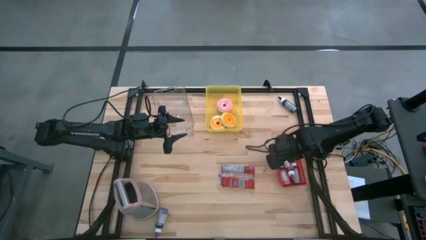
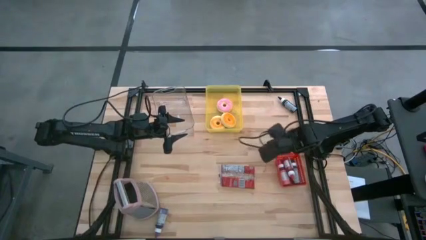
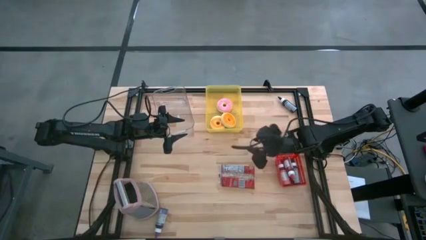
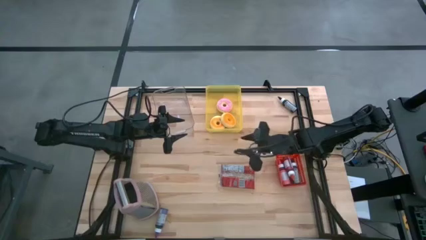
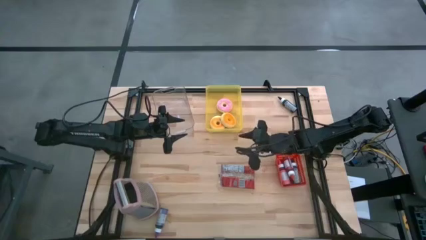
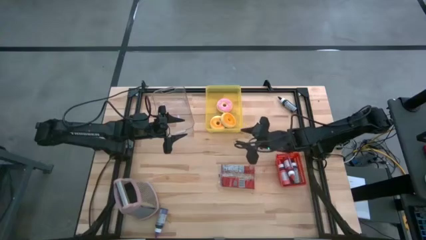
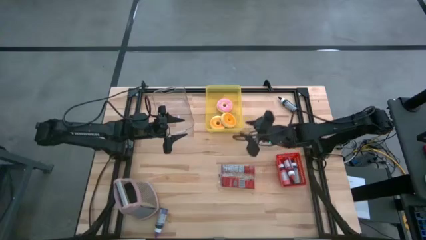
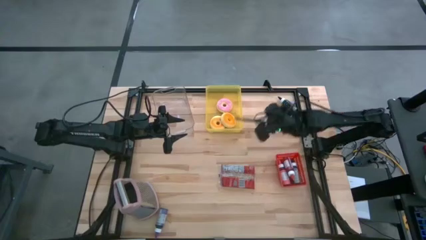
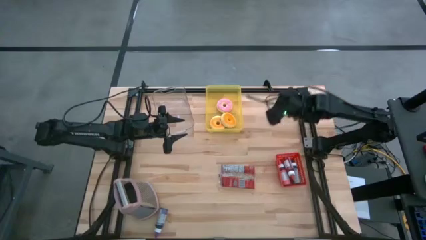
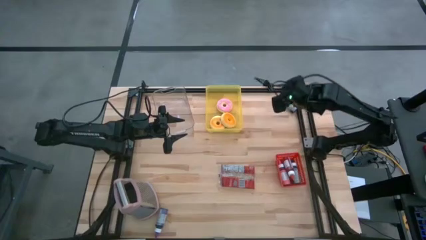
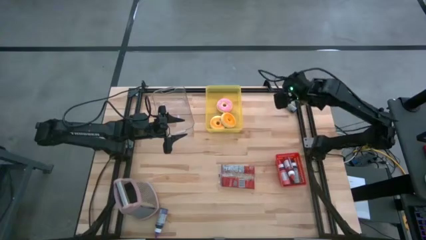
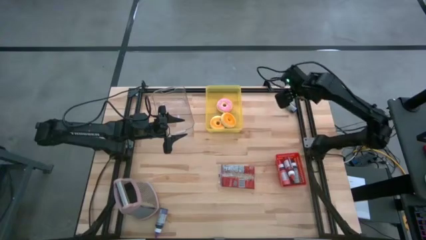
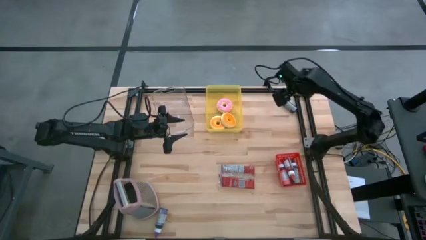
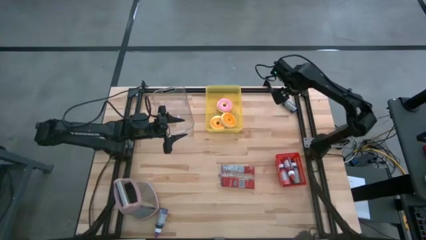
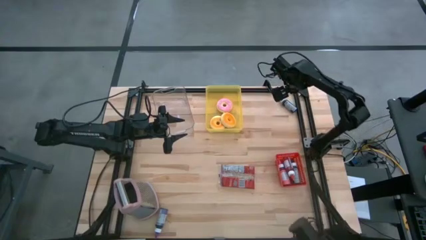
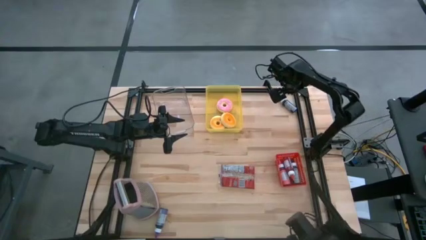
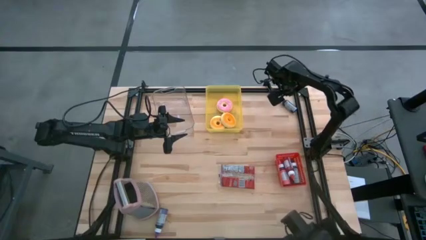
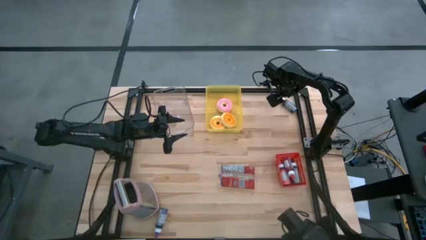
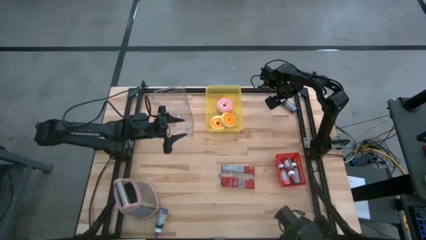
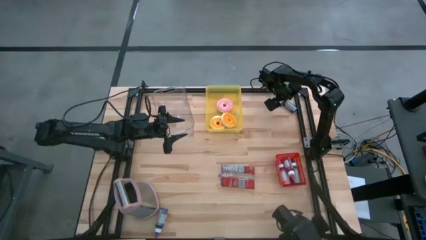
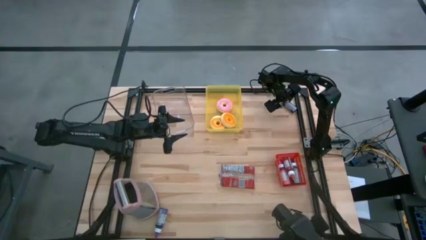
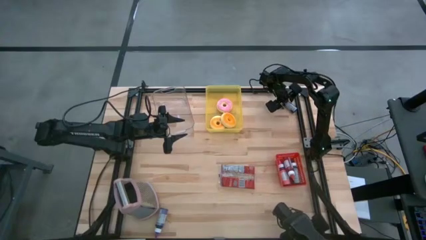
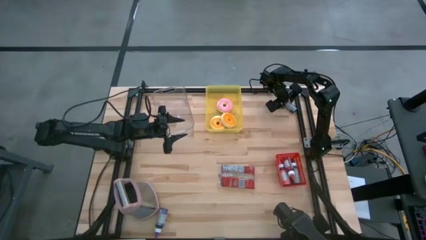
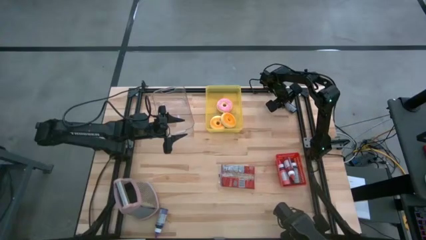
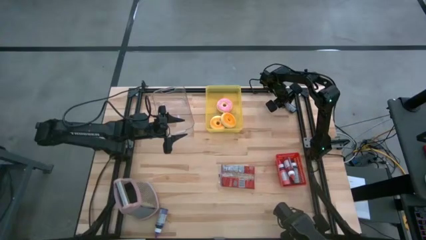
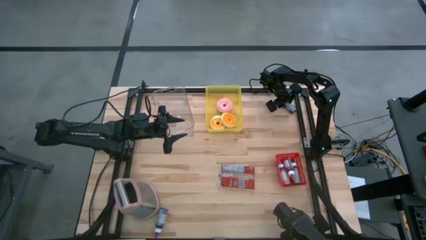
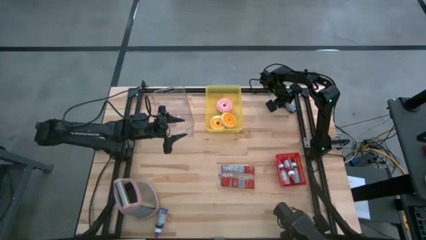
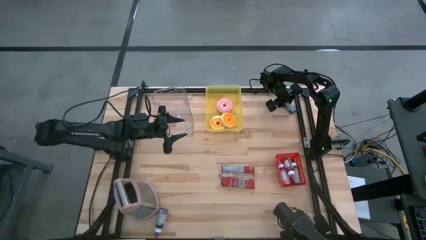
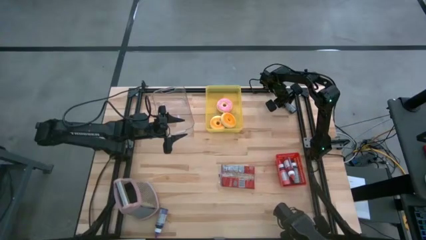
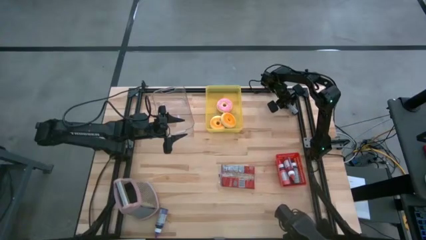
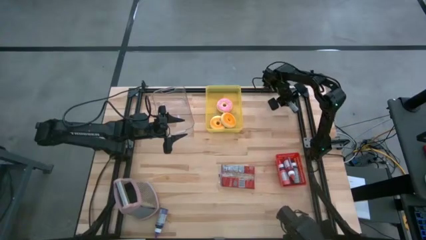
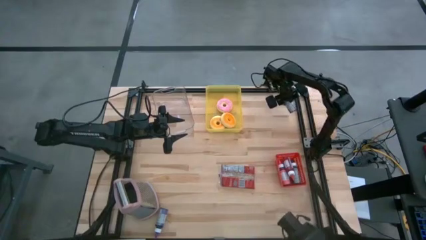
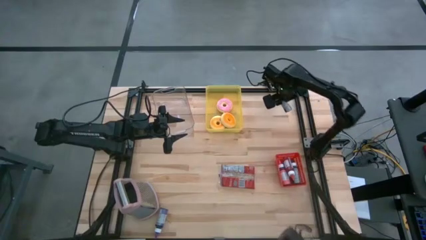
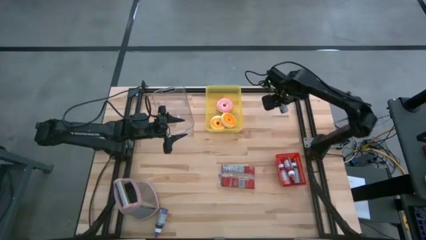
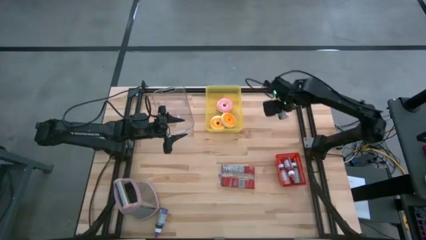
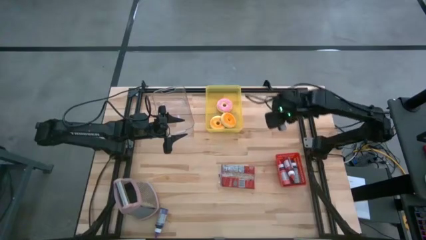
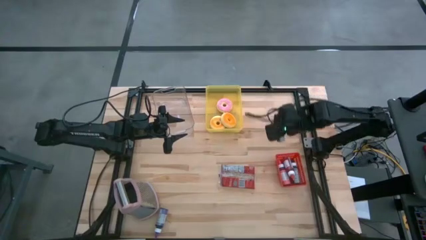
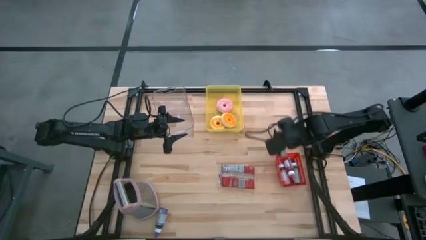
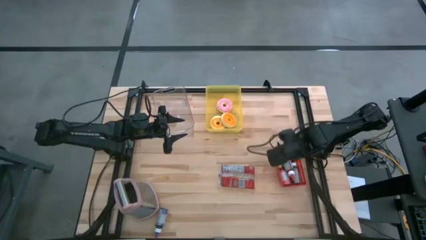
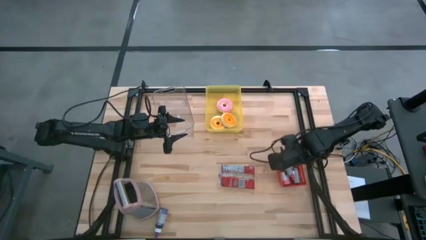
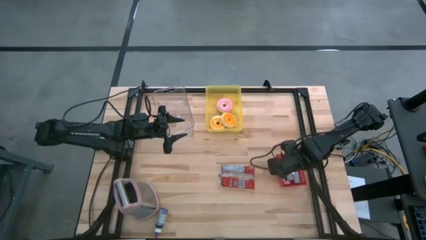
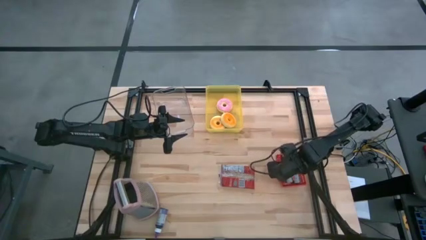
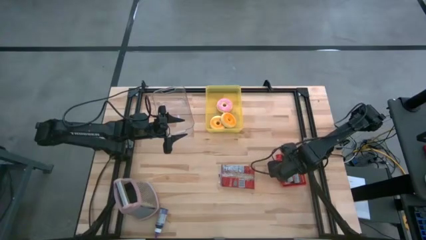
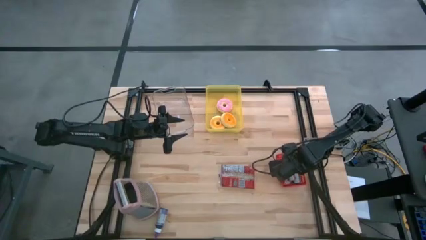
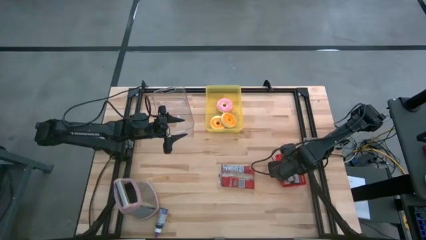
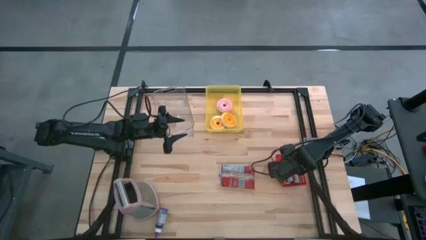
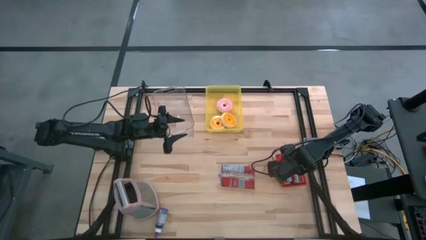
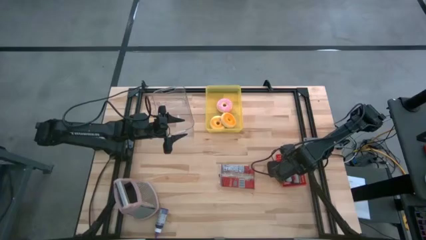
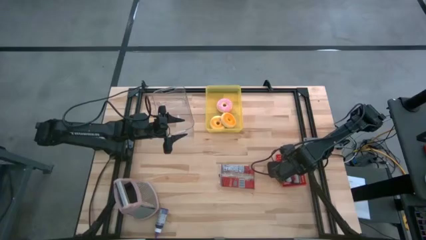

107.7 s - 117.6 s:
Task: Pick & Place Food Item
Put the black food coloring bottle into the red bin

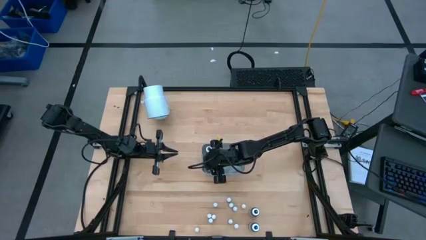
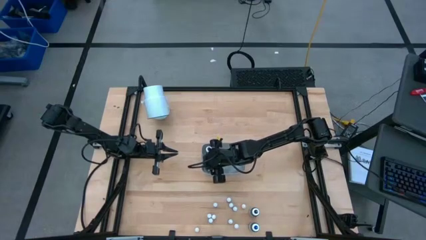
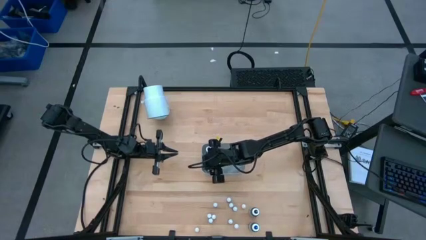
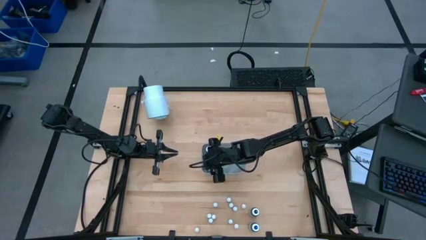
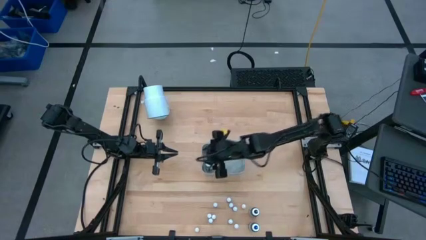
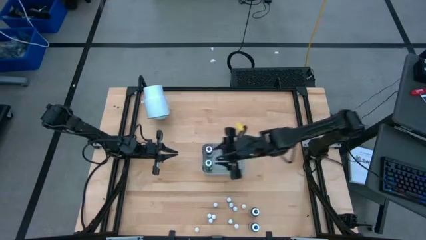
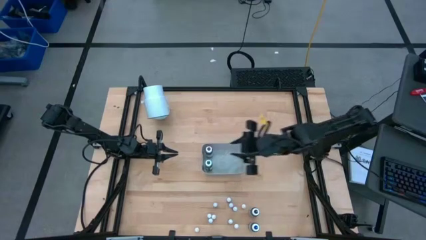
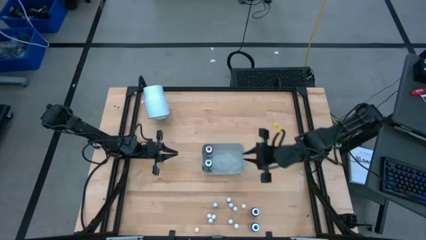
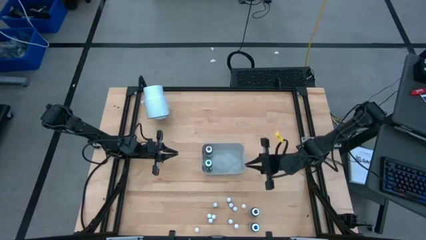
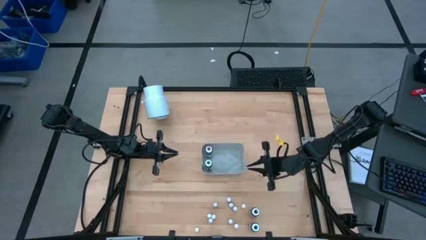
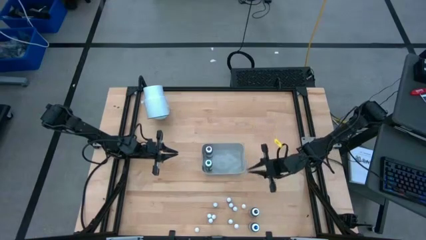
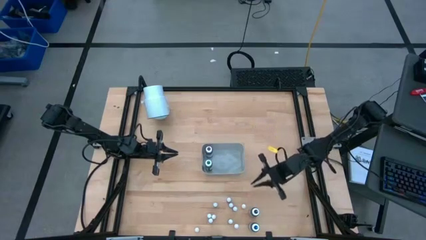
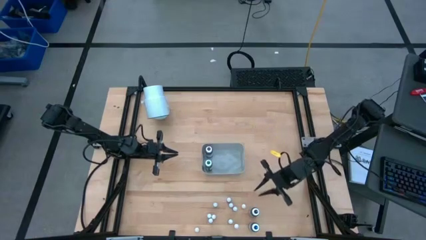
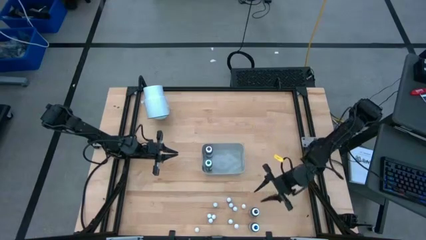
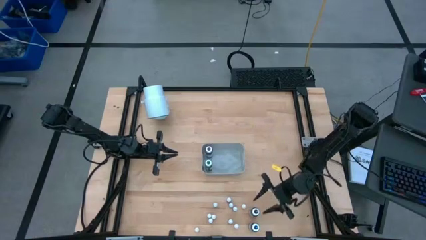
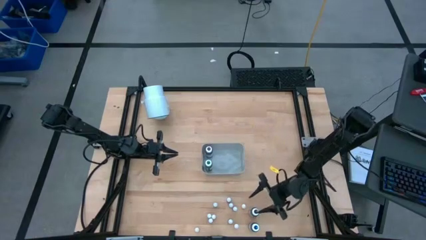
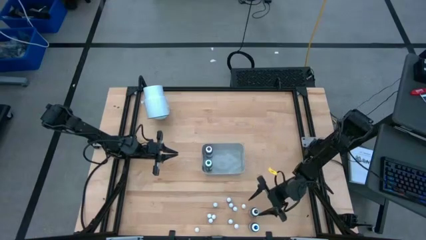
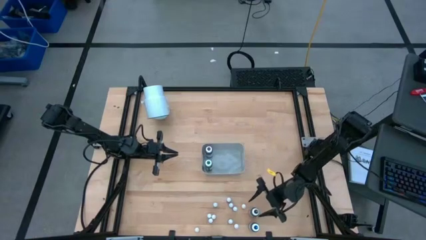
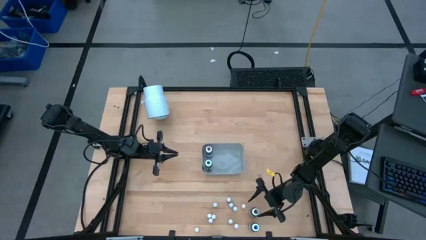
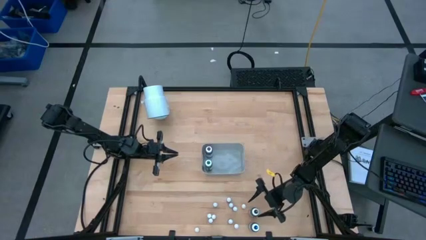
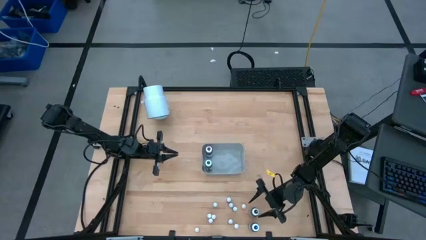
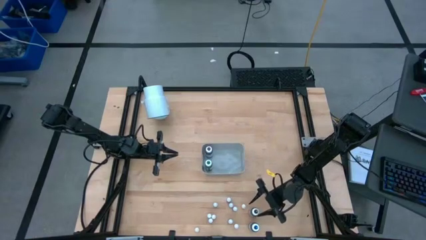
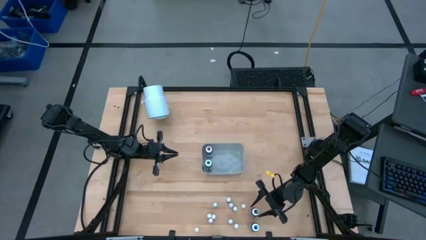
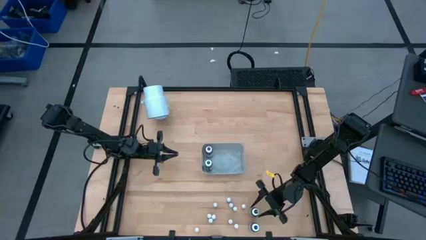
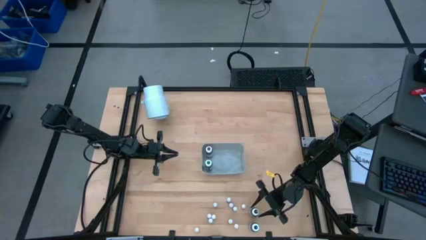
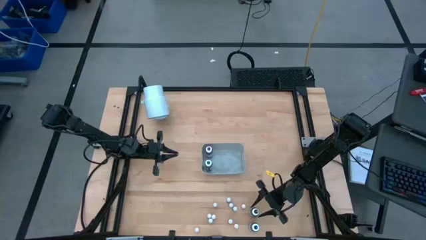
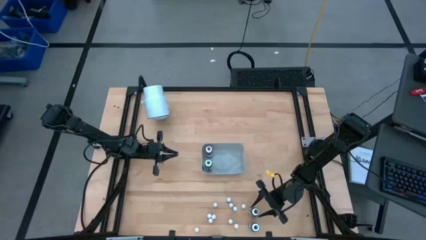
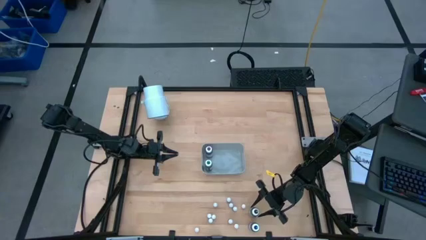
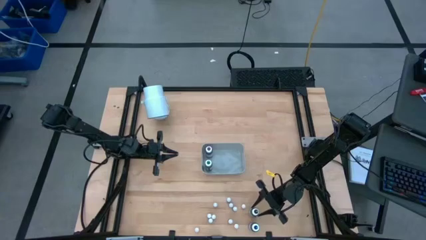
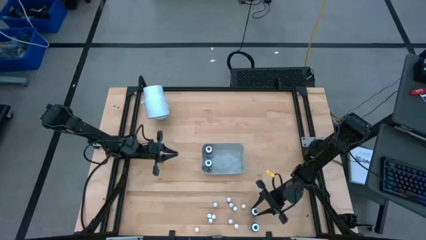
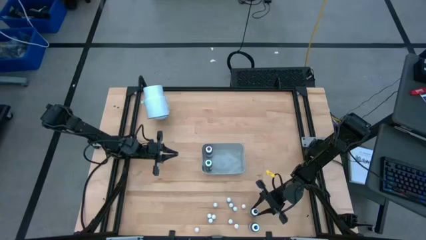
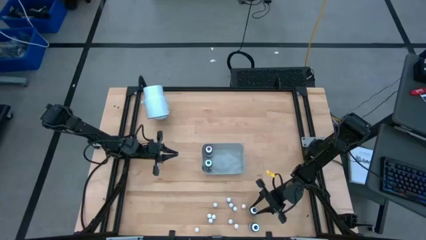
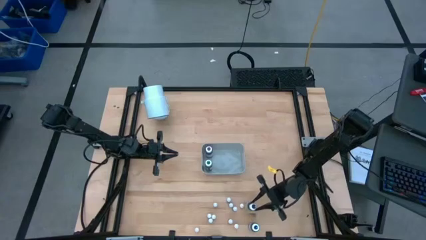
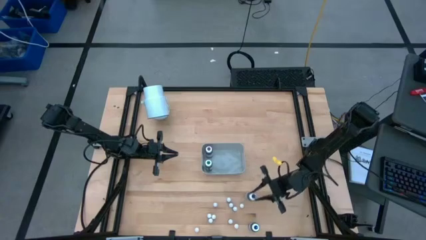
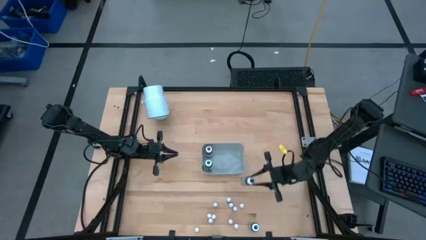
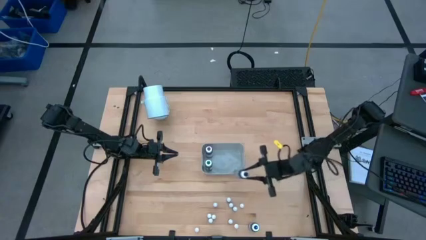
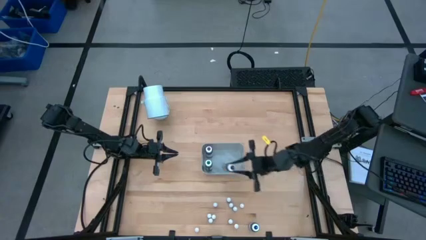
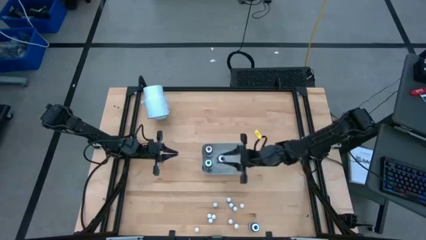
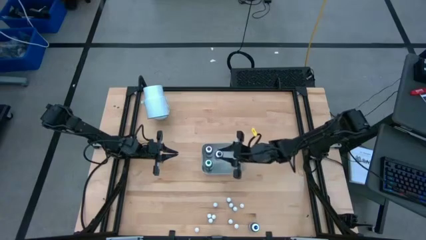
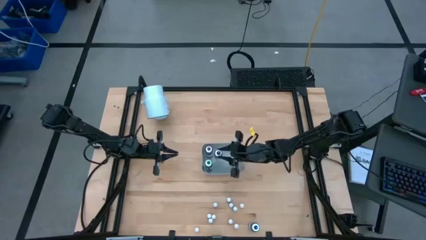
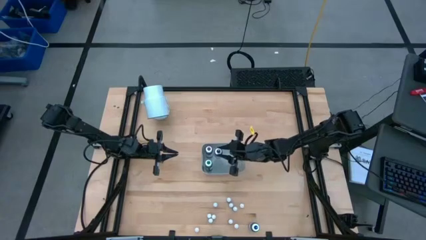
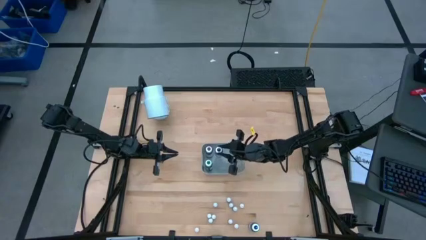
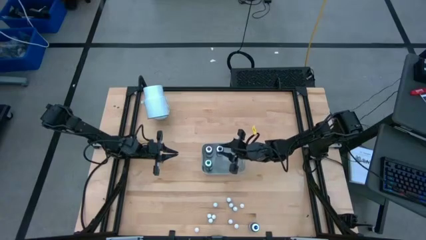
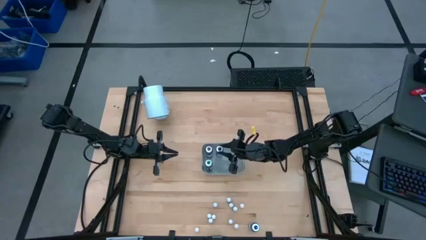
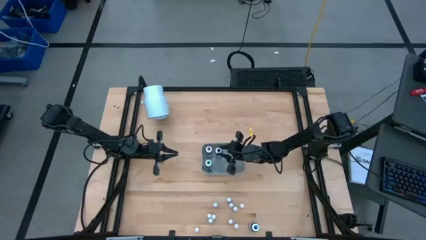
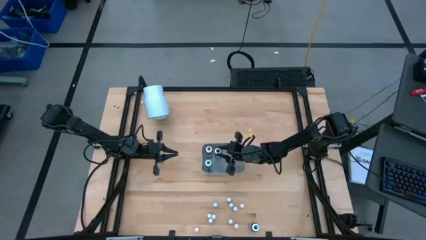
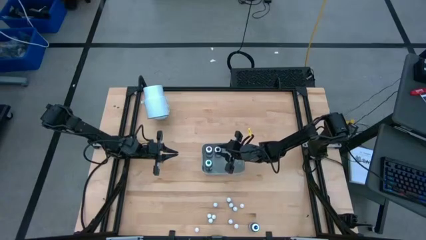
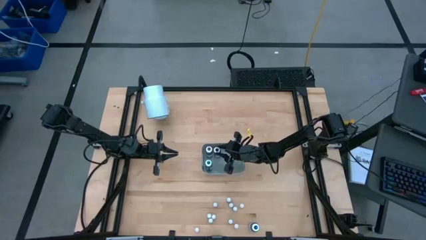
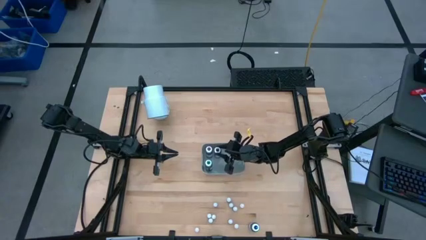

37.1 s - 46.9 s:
Task: Pick & Place food coloring
Put the large black food coloring bottle into the bin
